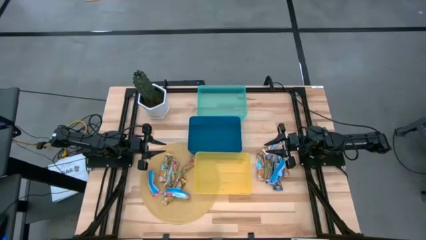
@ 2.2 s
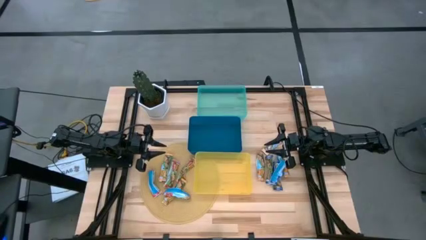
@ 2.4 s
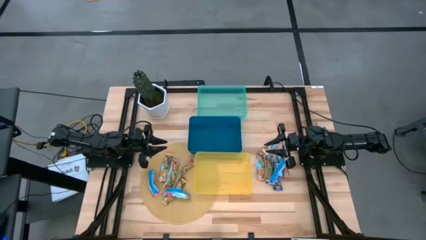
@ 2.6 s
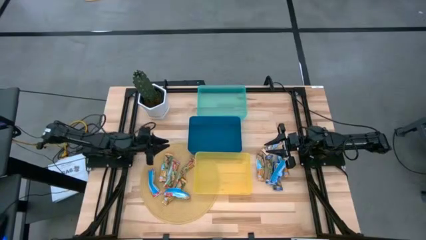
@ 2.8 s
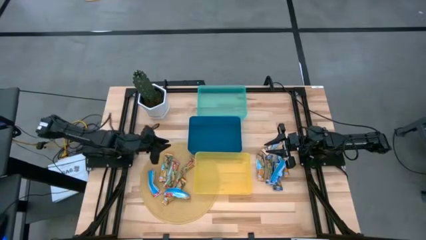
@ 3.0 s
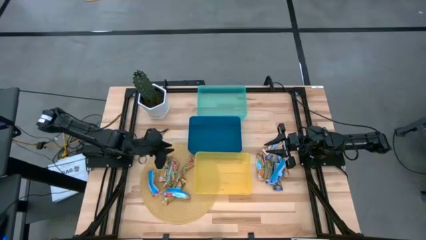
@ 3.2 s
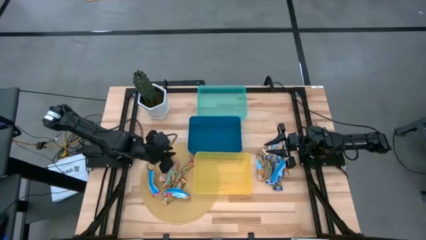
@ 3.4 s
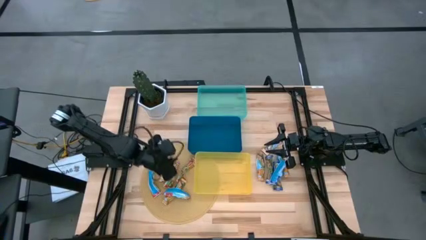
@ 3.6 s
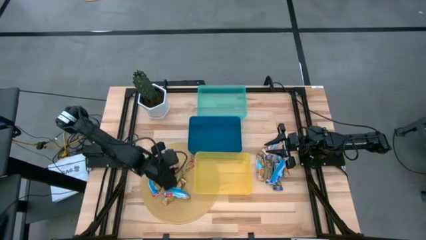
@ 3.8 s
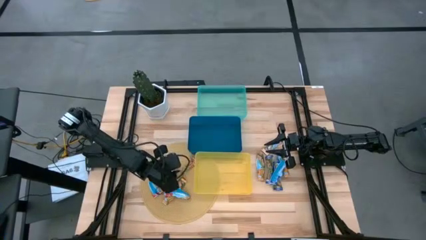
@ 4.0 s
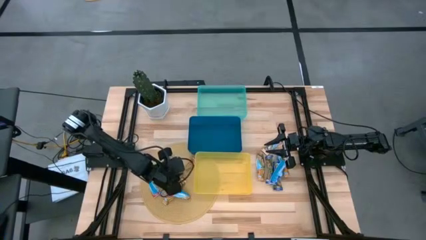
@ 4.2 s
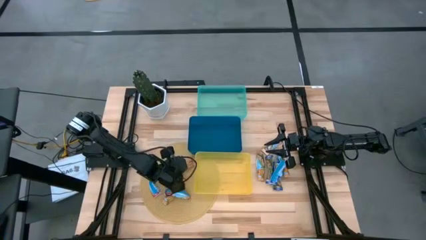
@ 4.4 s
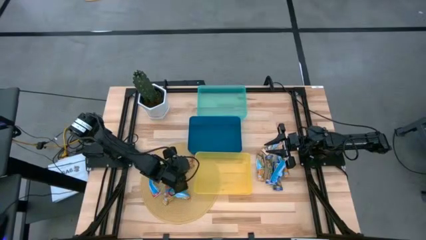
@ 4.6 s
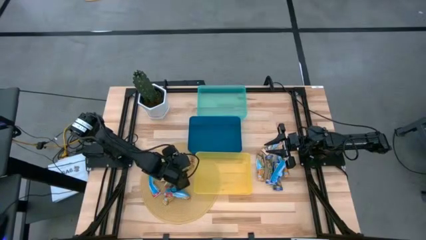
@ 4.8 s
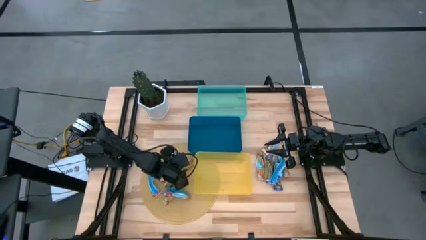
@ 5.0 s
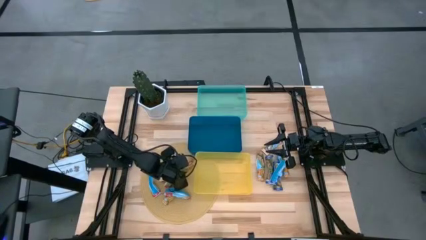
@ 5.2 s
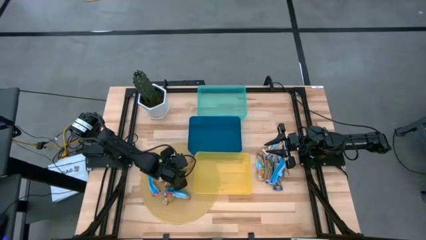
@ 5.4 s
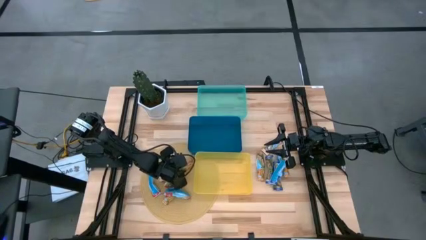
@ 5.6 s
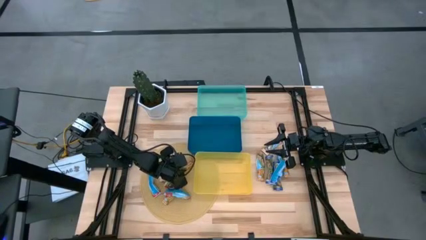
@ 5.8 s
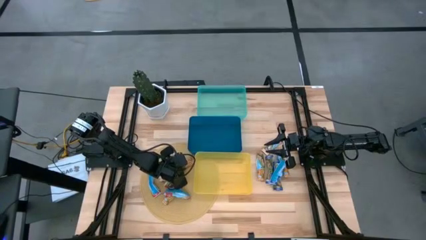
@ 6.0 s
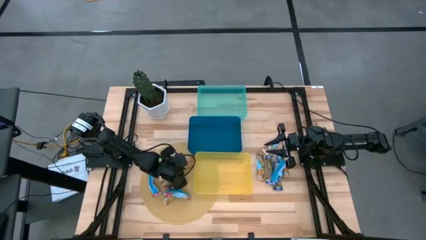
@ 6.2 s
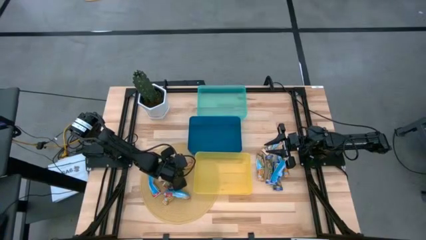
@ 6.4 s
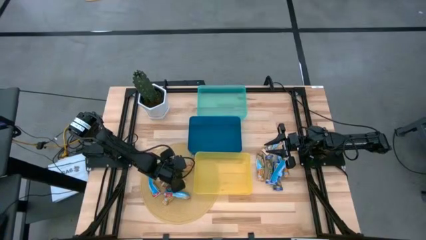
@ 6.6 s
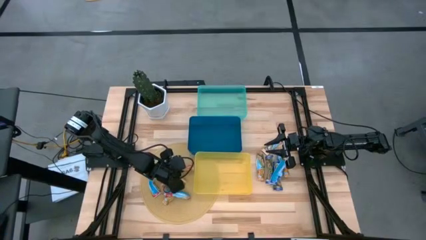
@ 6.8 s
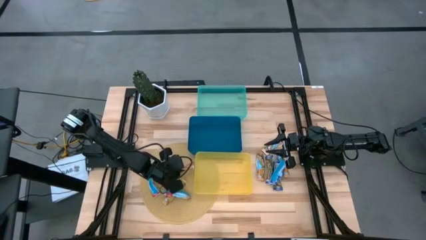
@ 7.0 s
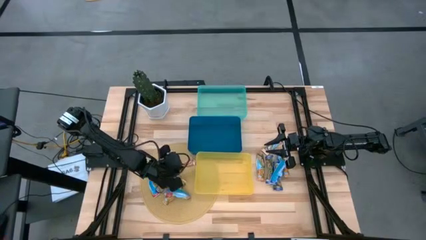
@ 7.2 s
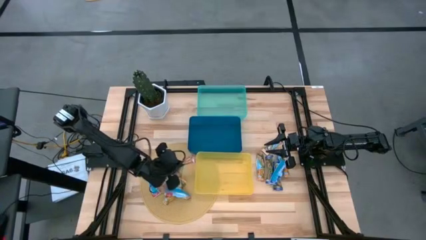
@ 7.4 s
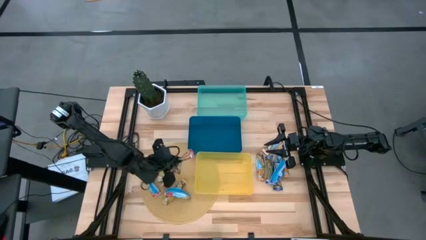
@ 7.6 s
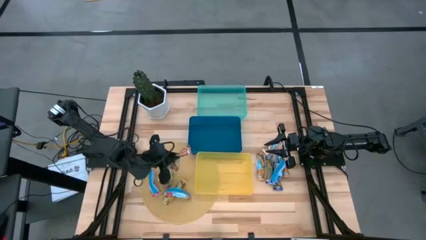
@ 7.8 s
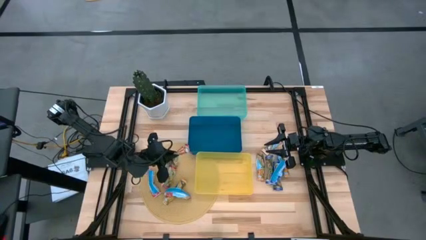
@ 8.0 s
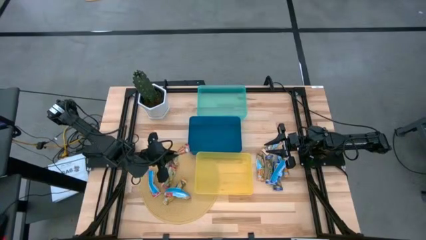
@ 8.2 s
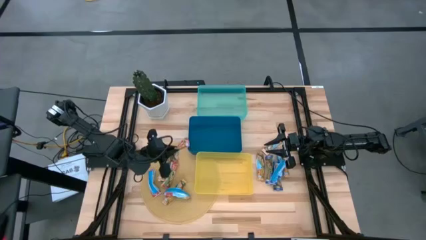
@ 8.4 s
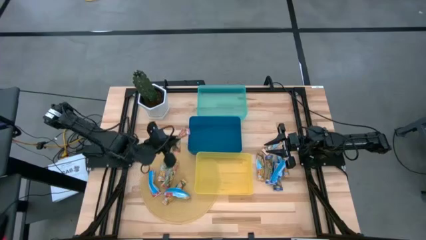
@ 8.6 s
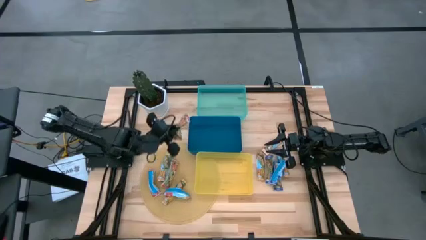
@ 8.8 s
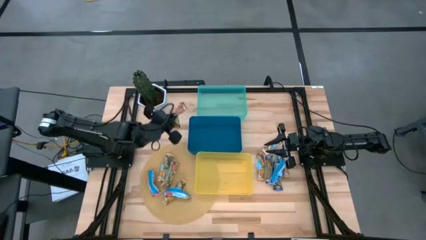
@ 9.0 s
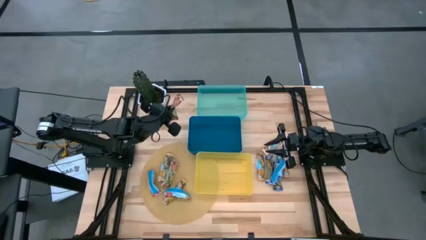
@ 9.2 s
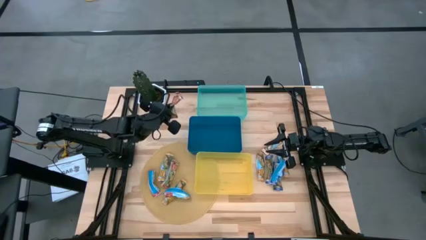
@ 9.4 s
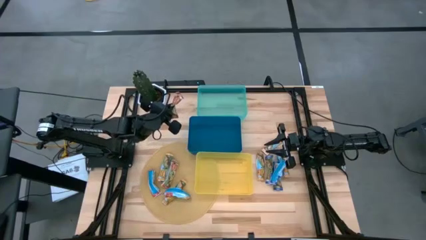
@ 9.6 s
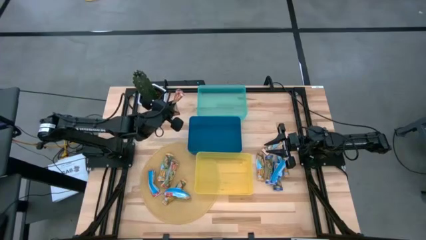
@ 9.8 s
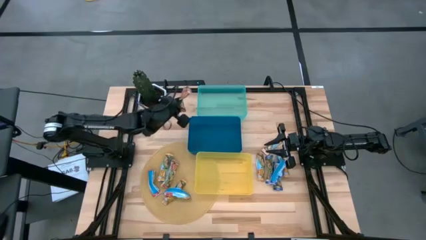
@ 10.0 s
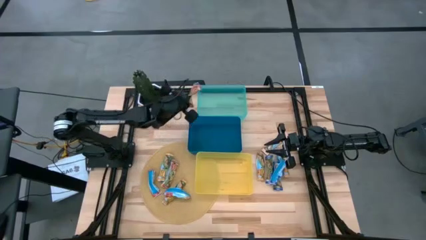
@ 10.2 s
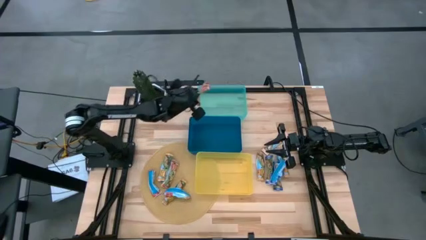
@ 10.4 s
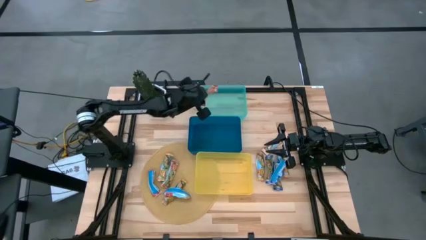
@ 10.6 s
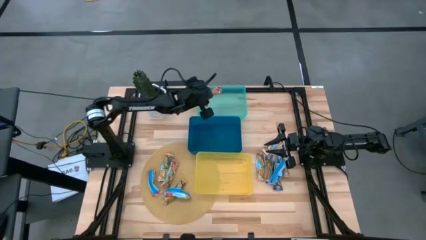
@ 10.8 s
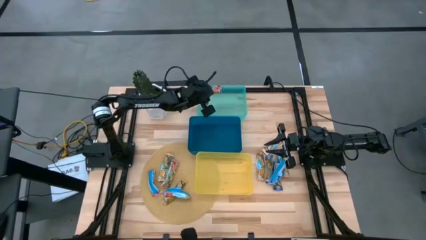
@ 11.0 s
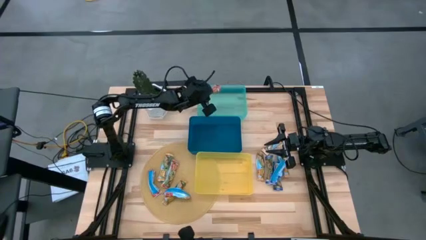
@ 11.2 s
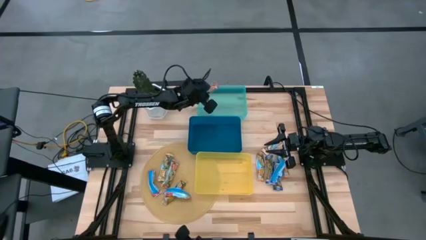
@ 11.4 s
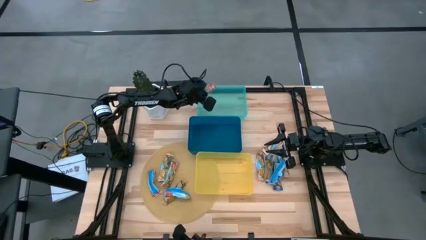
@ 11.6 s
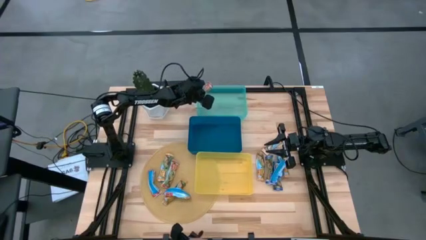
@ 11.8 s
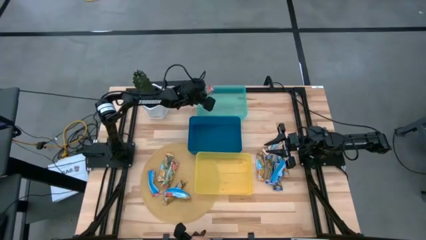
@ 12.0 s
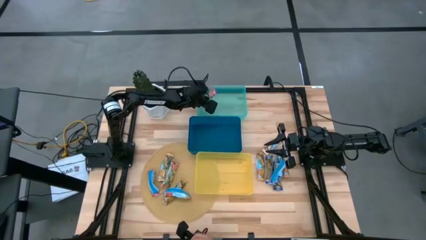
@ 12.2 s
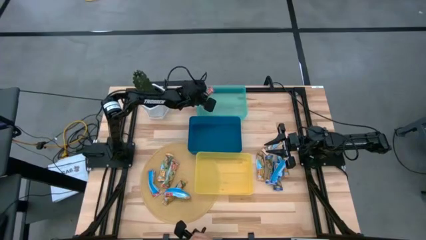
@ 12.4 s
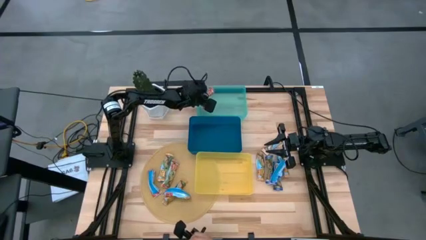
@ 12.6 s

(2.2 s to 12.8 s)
Task: Pick and place Granola Bars by type
Put the red granola bar into the green bin

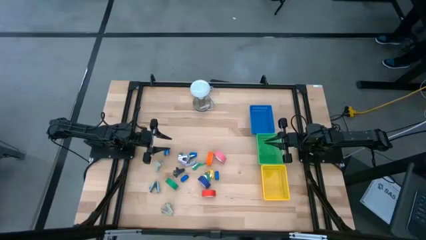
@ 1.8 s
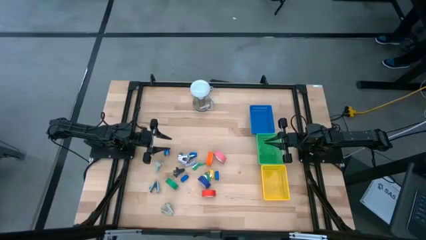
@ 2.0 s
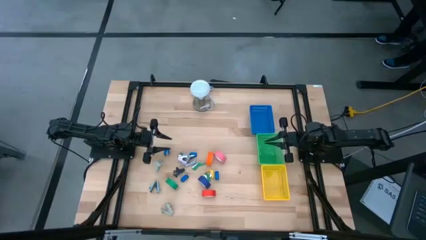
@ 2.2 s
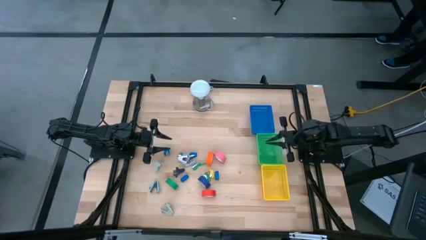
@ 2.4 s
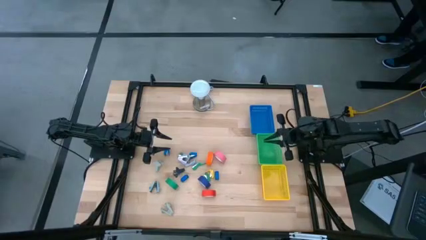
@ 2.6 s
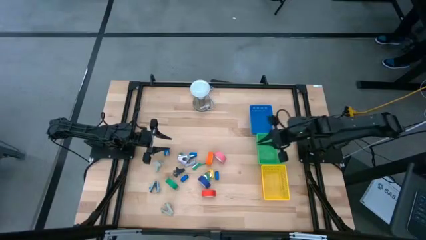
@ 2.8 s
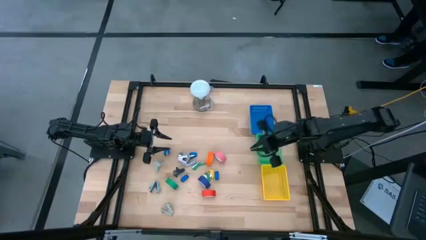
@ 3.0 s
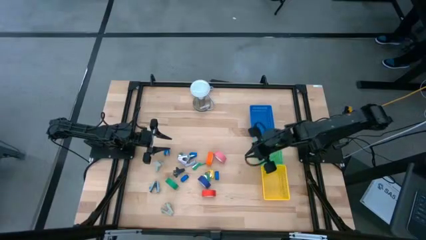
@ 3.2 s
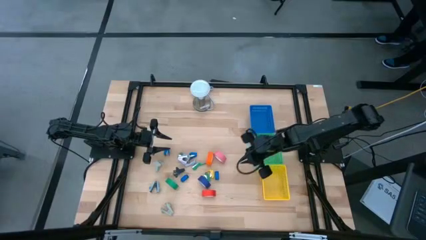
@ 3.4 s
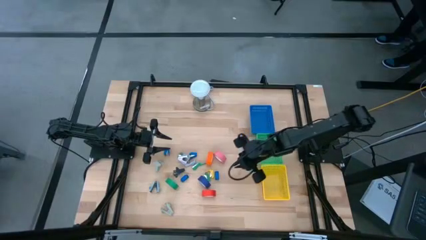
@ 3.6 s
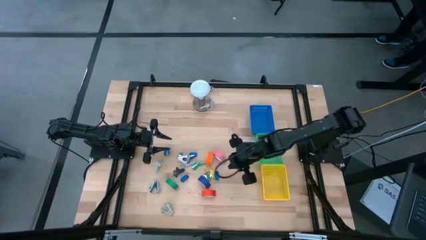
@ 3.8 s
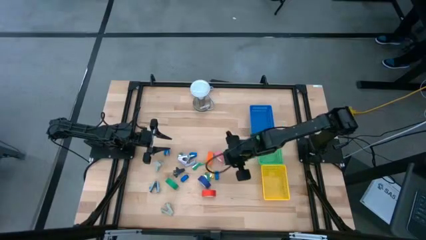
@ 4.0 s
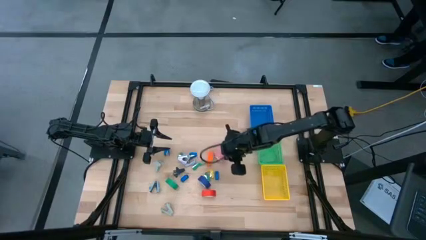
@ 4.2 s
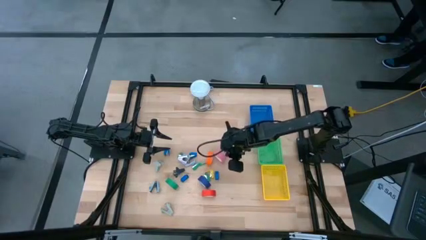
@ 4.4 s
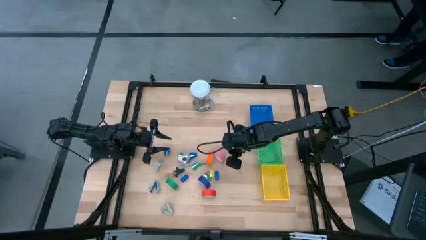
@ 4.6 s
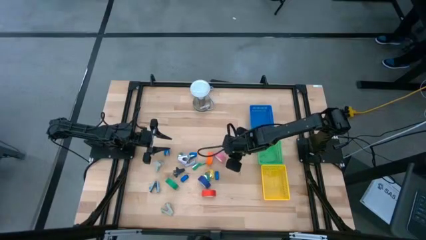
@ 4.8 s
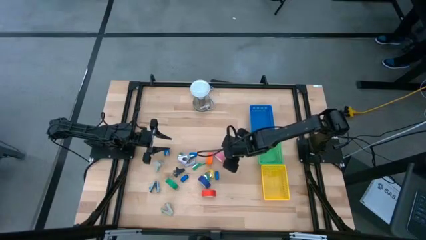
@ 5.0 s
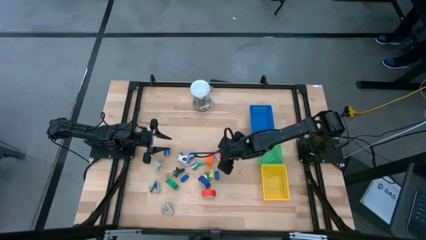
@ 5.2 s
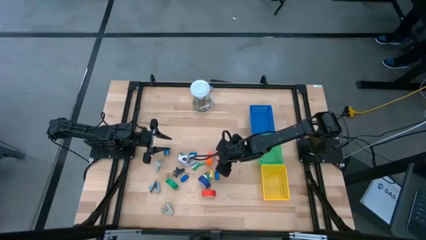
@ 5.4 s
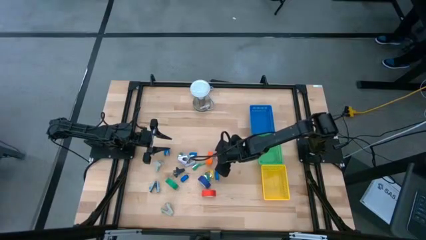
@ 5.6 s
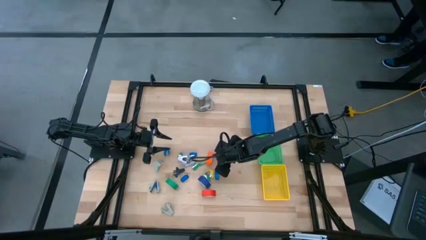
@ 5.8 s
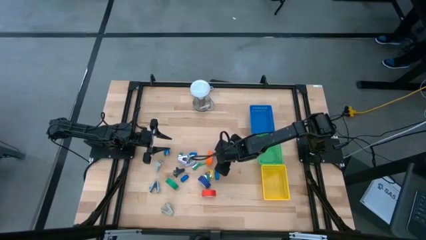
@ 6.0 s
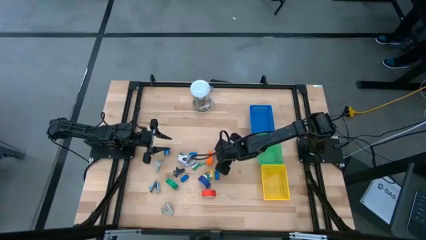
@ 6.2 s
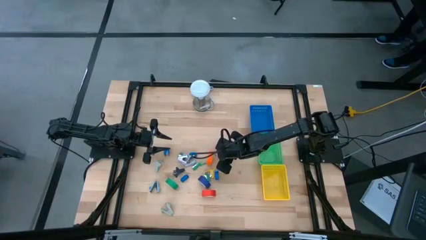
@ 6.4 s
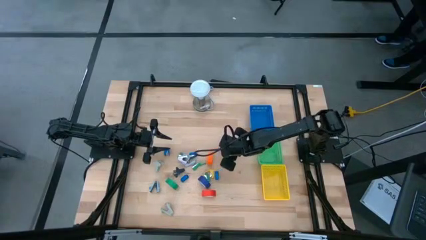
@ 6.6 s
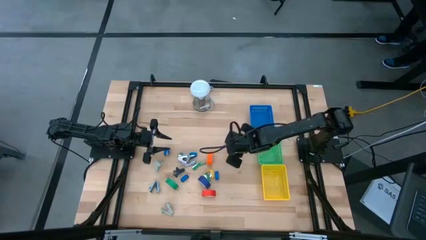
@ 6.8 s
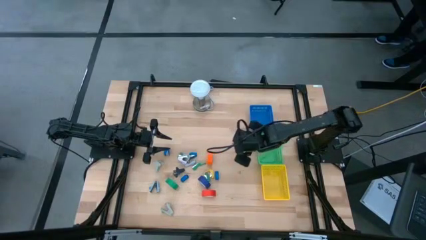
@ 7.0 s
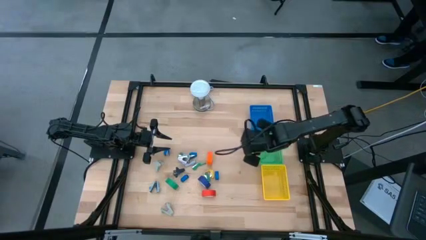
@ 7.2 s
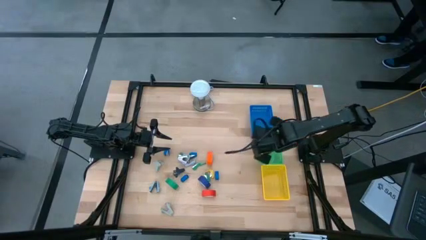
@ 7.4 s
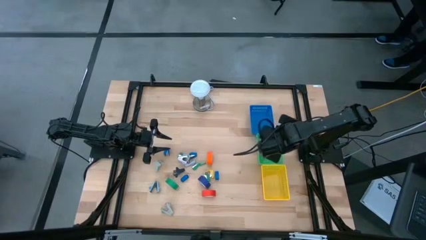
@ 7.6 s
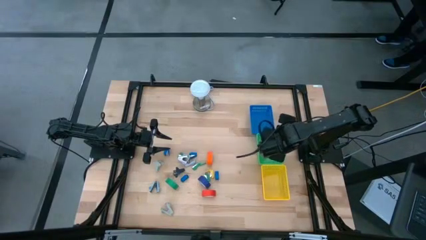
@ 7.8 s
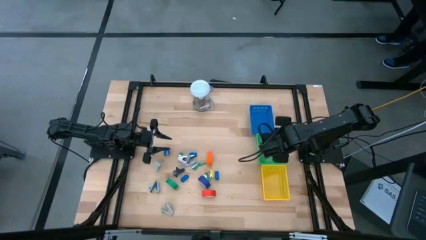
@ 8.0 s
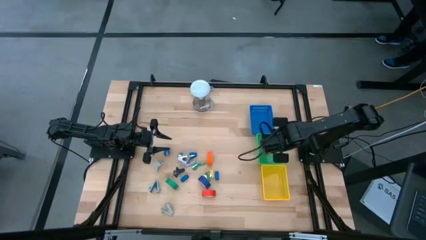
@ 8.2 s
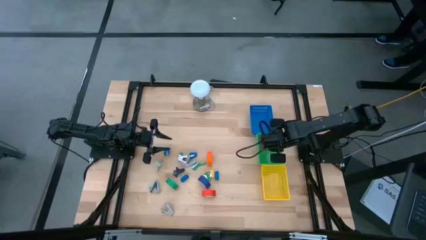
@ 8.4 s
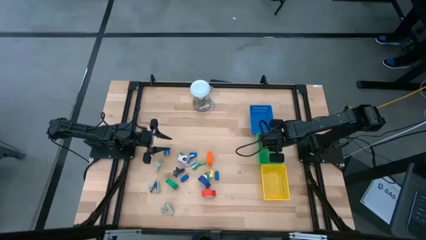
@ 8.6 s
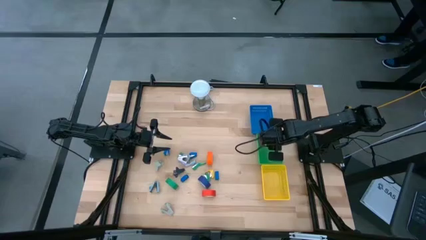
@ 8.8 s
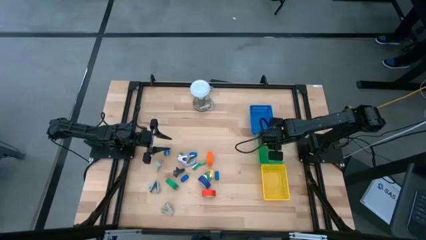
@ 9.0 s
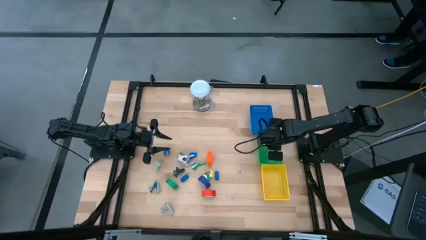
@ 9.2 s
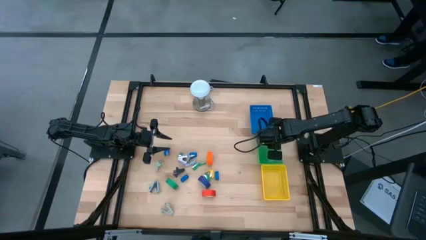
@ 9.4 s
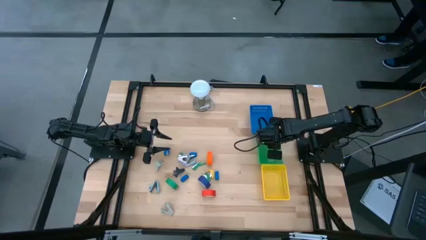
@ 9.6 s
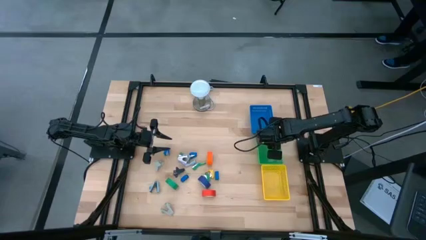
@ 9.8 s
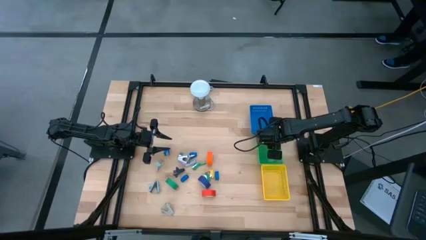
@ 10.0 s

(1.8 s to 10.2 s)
Task: Pick and place Stapler, Stapler remover, tape
Put the pink tape into the green bin
